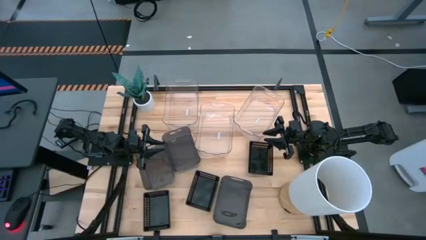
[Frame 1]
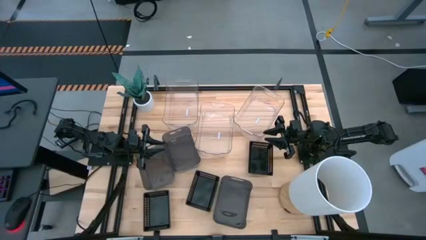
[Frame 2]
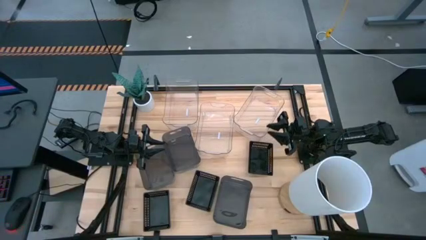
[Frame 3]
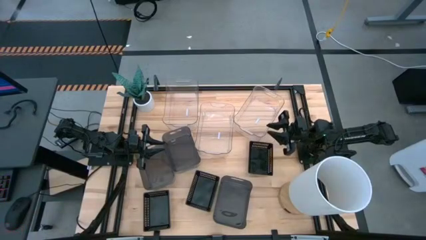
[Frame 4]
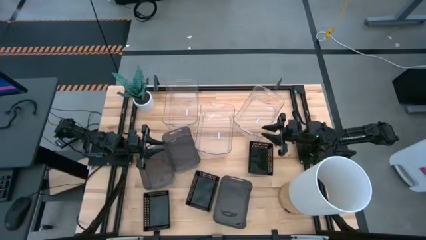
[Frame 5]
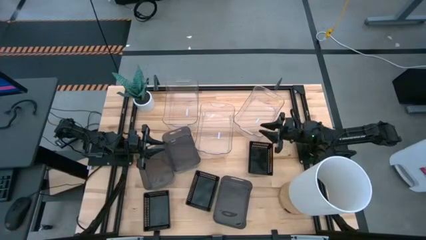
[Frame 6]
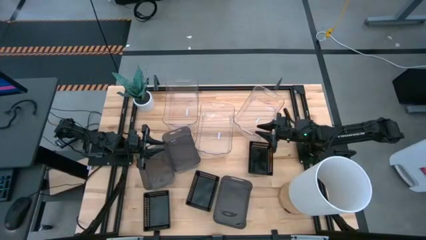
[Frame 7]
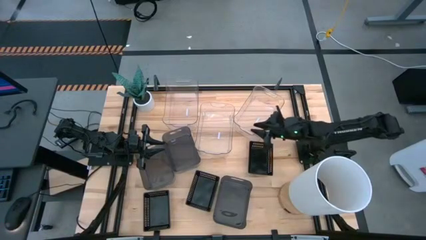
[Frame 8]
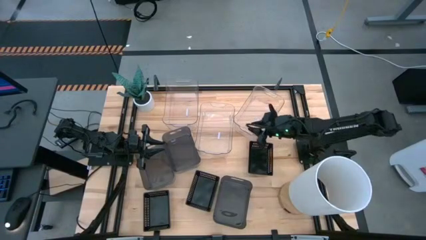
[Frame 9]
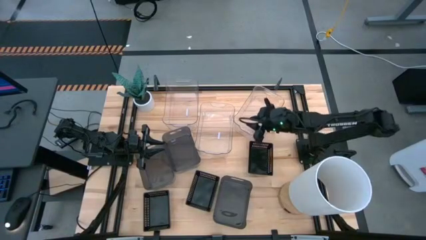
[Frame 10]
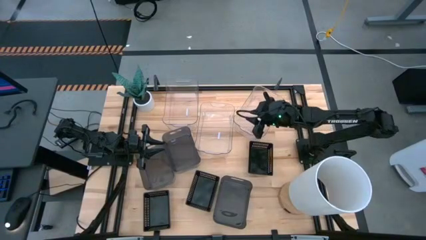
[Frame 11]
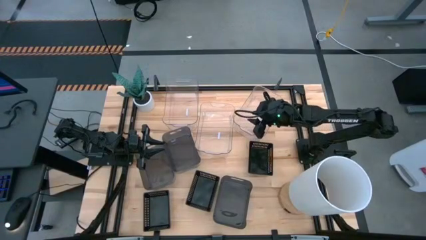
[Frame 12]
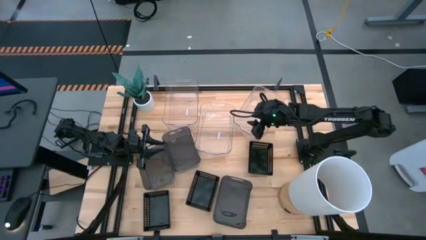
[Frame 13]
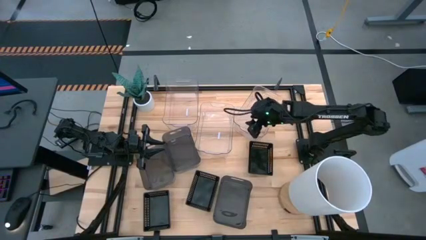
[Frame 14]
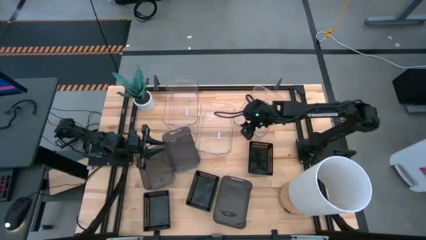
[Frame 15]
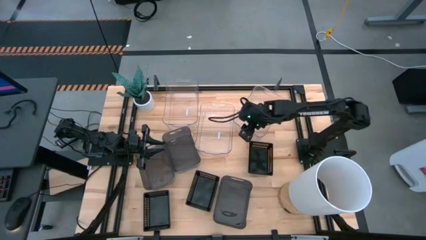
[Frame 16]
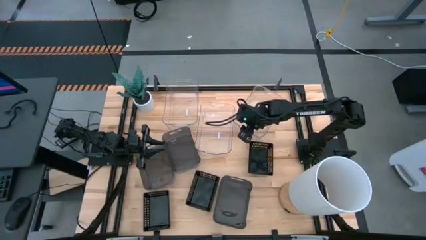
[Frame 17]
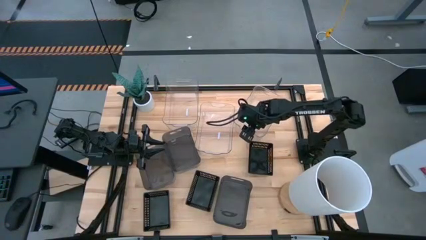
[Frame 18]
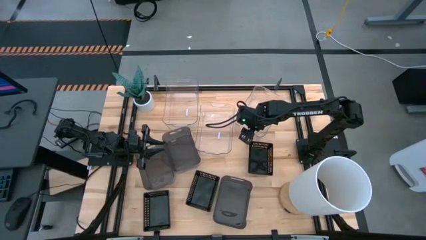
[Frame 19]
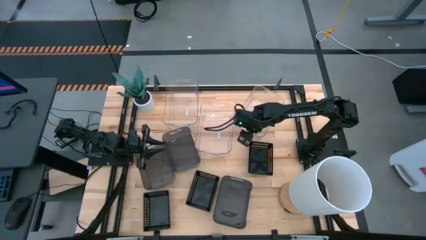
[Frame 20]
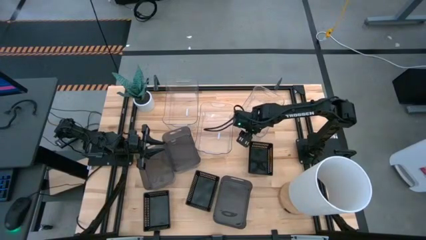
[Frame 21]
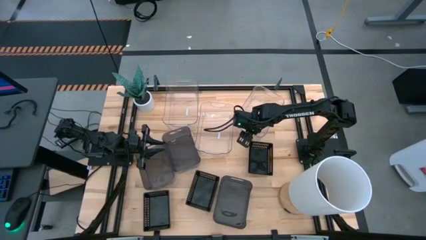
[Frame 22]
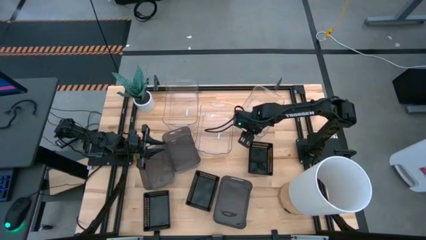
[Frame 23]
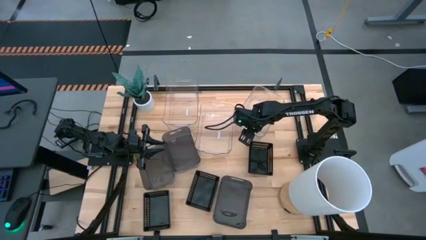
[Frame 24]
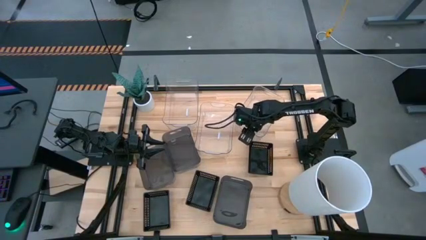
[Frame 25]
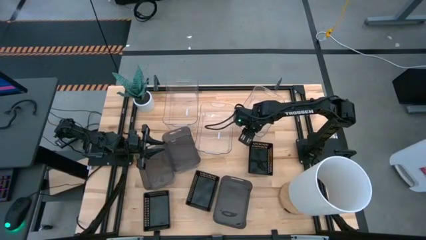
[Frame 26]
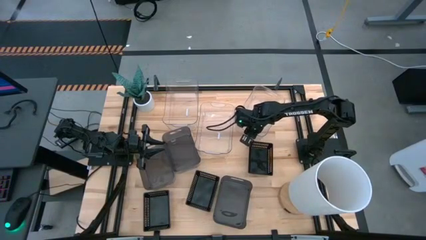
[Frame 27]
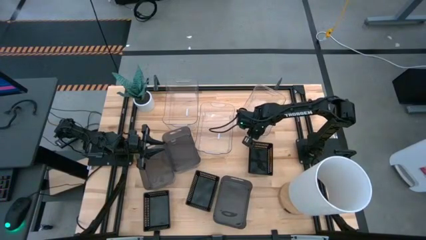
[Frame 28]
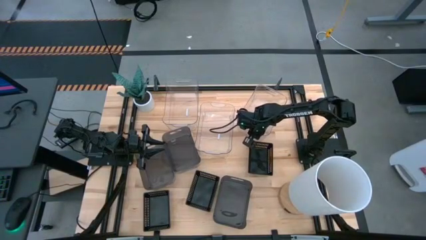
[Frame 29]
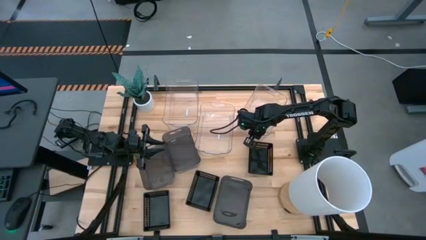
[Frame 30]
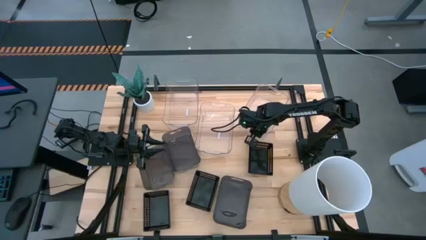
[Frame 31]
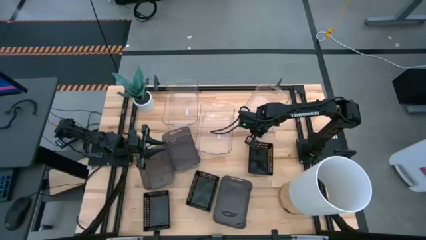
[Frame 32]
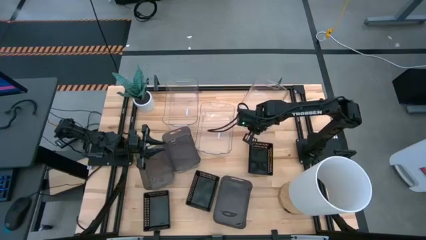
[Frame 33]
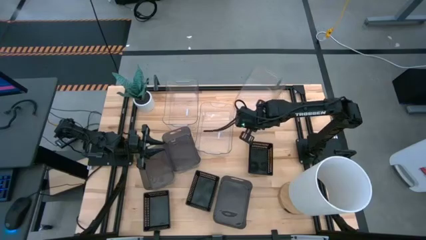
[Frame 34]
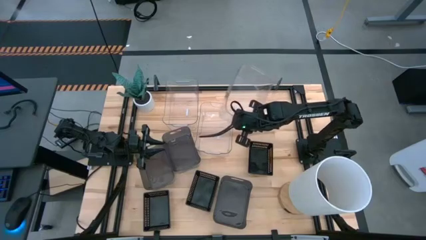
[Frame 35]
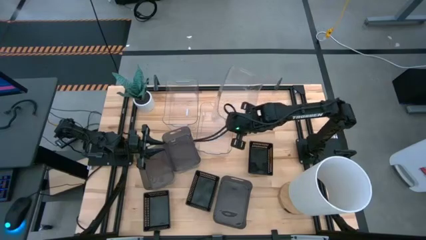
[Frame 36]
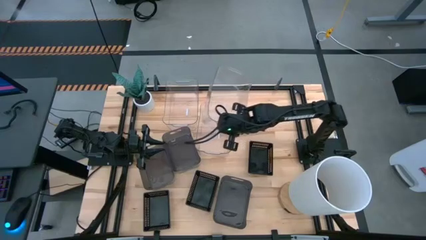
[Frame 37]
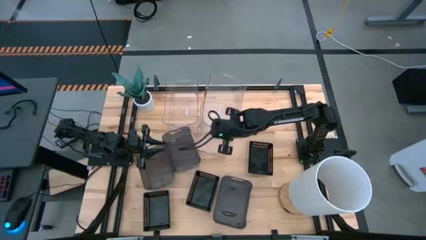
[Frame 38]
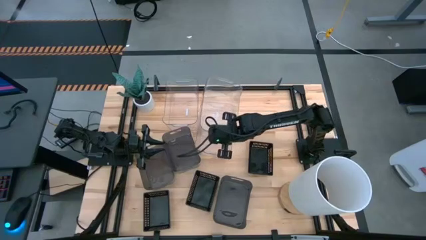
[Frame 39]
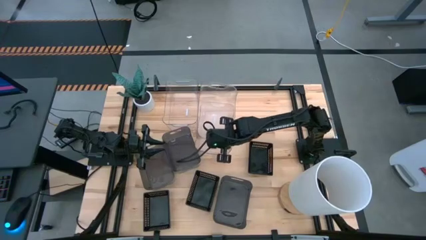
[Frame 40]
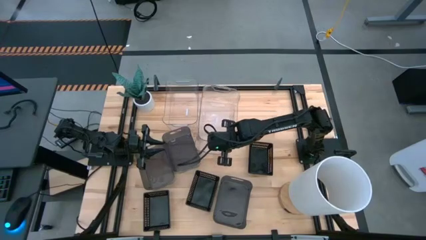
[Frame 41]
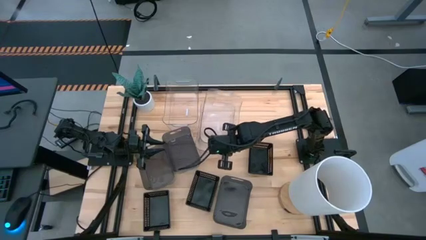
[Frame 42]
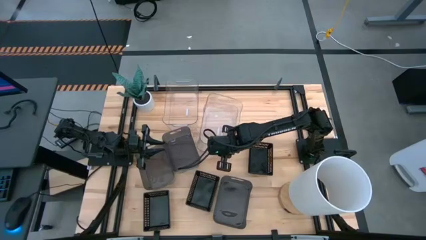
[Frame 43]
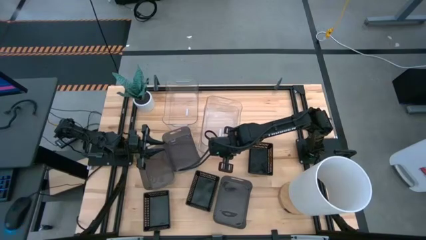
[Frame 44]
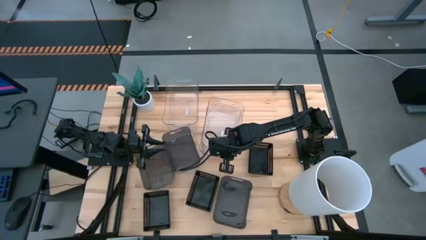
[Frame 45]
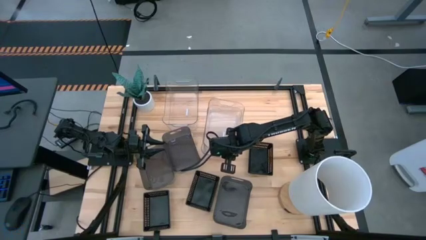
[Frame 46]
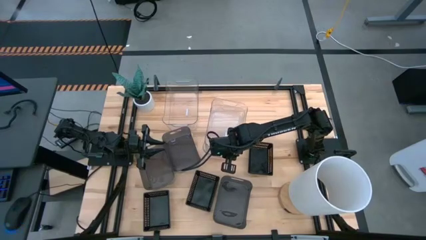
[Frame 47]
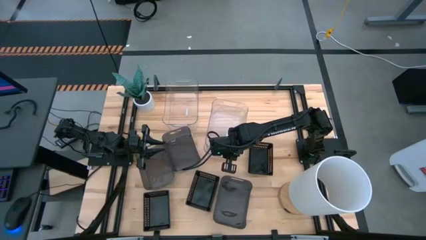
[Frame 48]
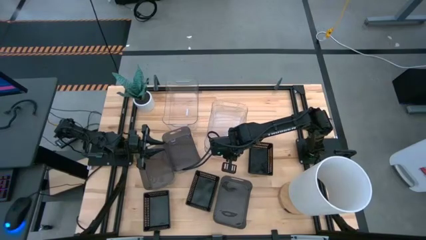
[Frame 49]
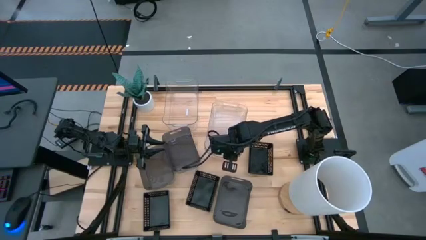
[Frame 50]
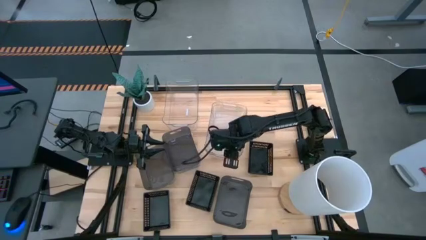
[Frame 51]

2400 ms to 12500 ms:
Stack the right transparent bin on the middle transparent bin
